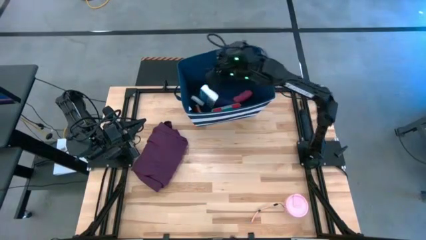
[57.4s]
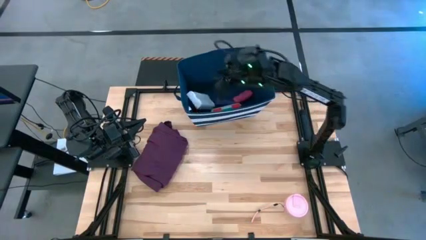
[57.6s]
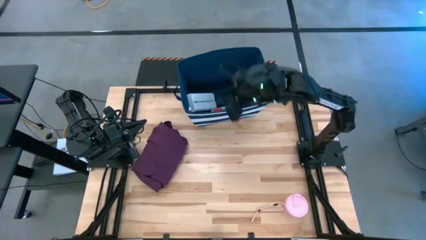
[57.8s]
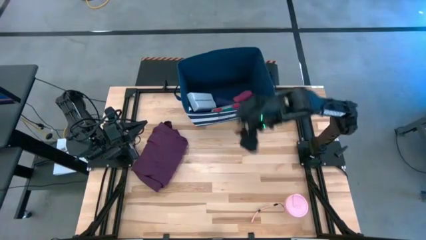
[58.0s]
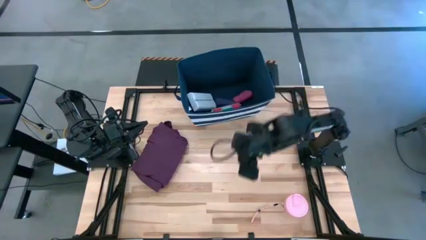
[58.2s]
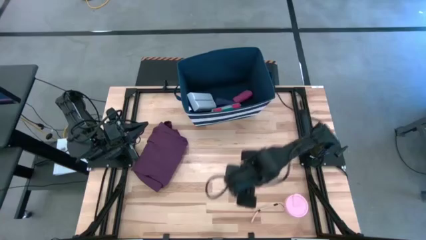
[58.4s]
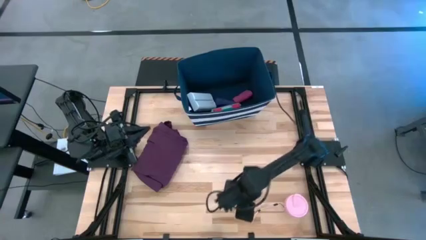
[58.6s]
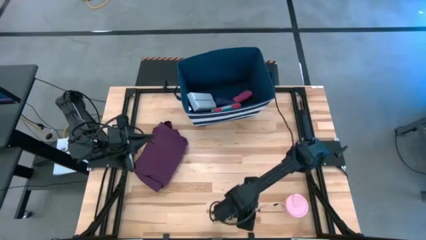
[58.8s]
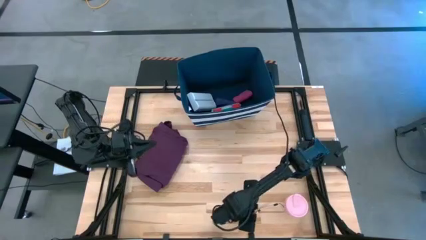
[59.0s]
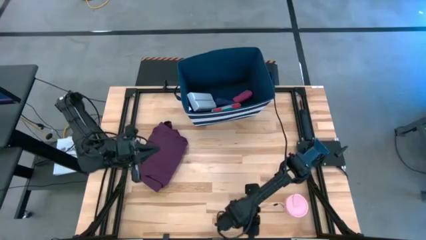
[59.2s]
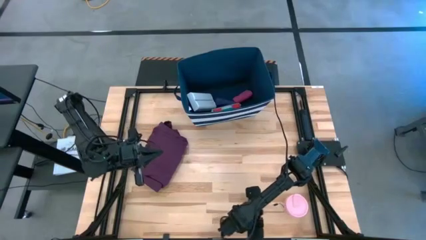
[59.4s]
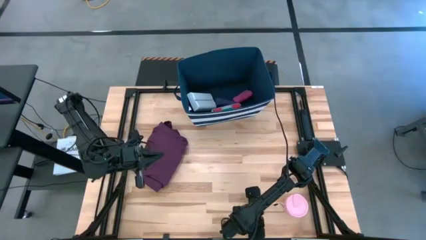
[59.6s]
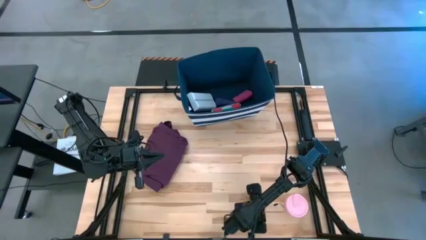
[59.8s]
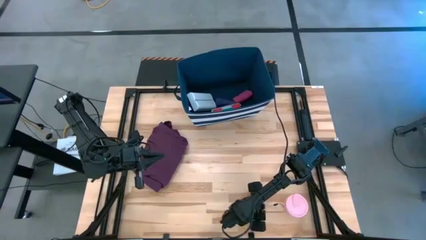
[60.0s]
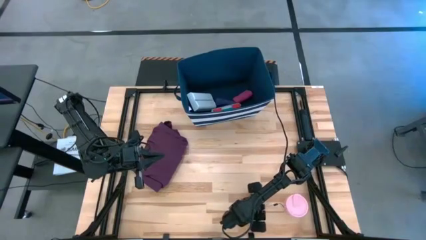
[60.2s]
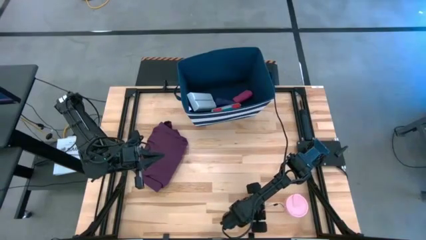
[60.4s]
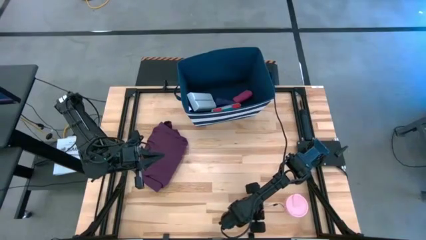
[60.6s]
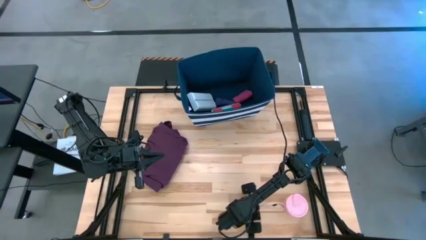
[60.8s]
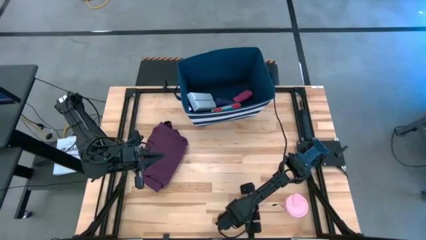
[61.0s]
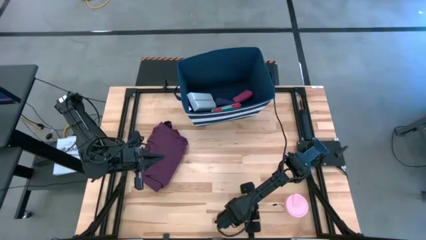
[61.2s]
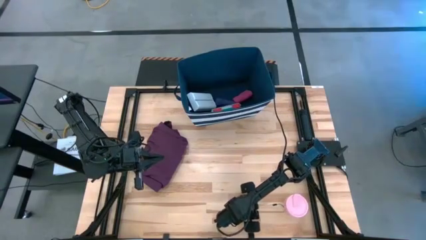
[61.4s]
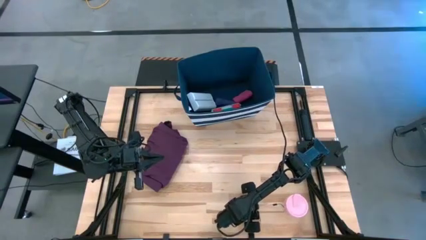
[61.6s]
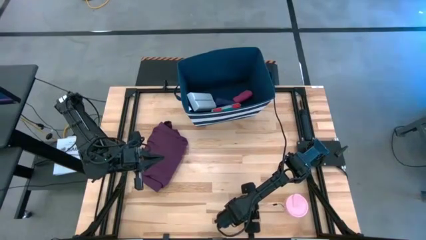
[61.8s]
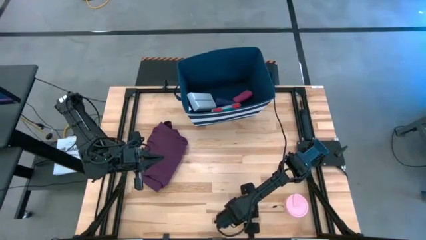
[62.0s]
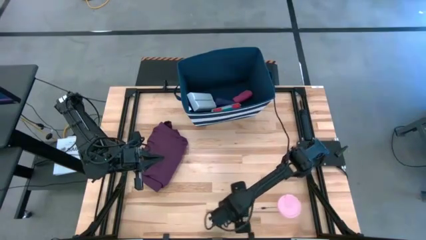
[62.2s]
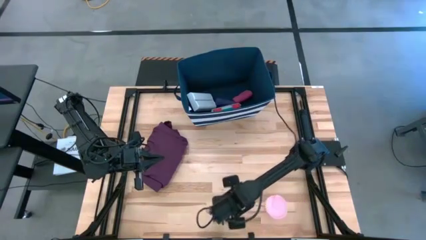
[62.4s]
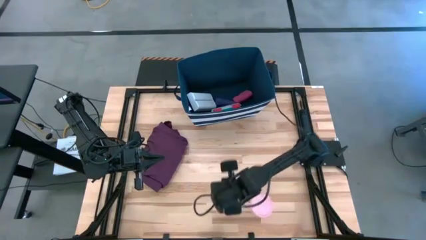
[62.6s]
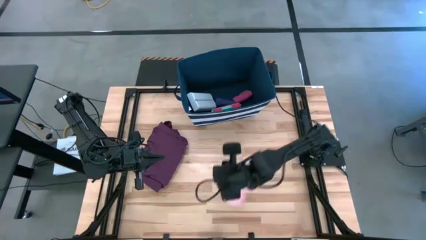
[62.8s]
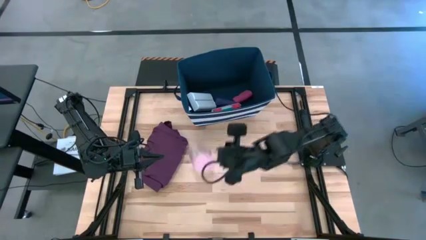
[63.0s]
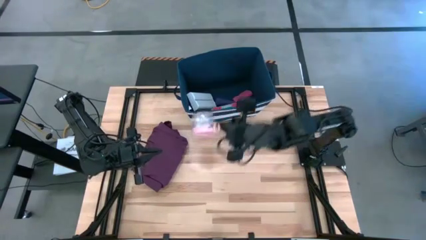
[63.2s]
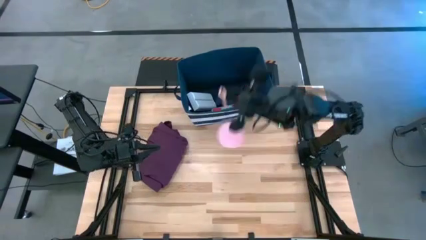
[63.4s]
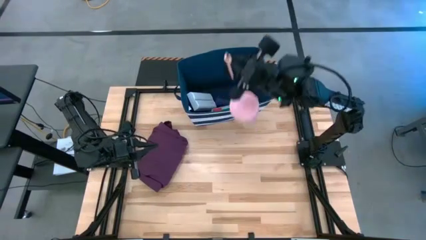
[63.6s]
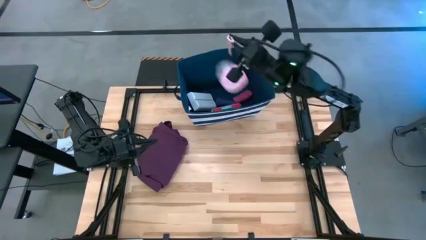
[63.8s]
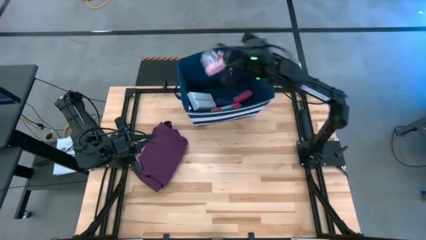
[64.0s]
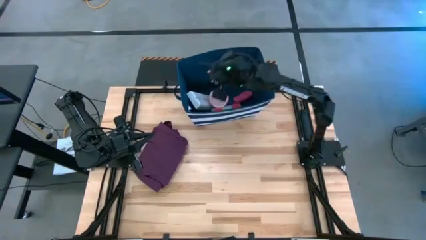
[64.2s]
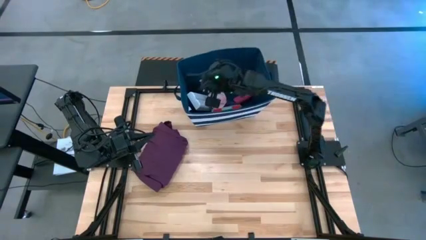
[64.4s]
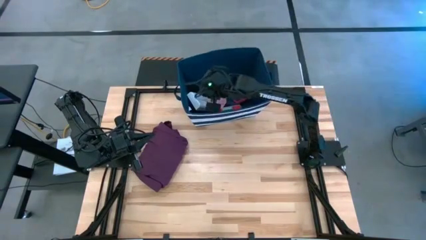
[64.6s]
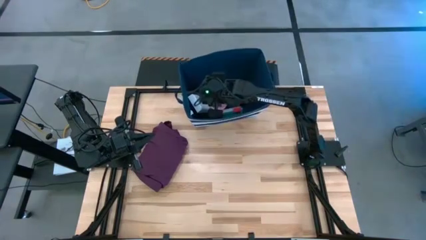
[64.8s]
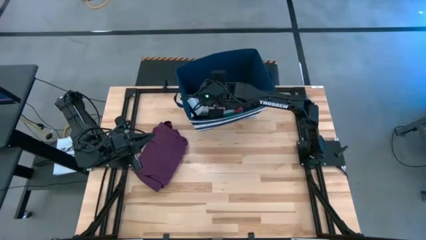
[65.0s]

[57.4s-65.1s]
Task: Pick & place medical supplies in basket/bin
Put the pink water bottle into the blue bin

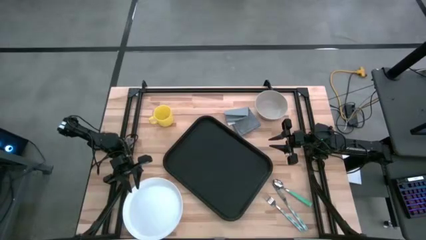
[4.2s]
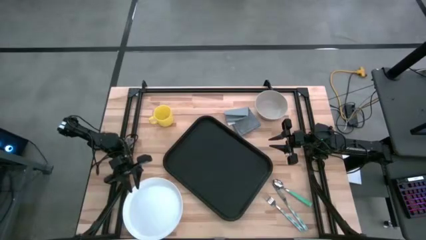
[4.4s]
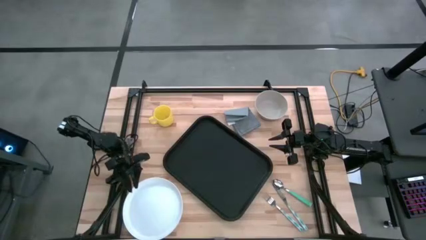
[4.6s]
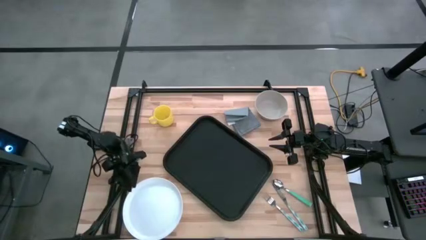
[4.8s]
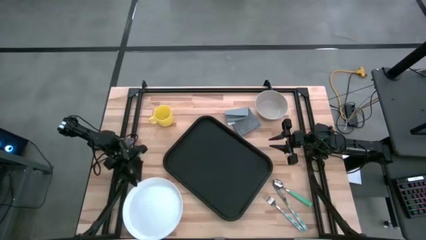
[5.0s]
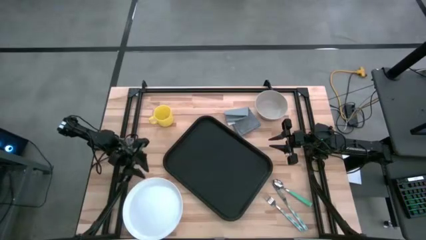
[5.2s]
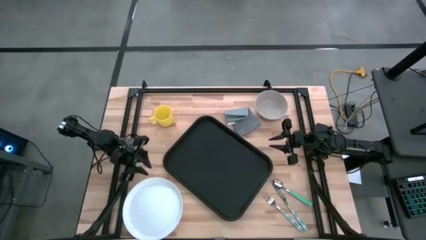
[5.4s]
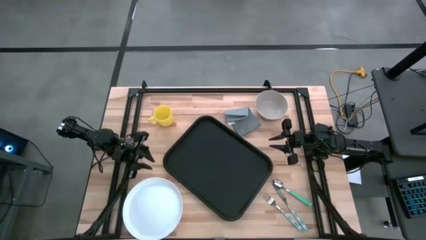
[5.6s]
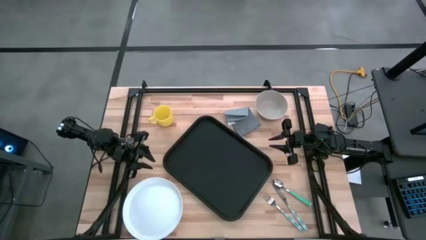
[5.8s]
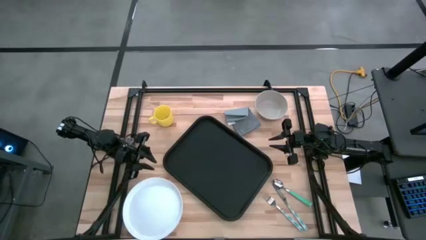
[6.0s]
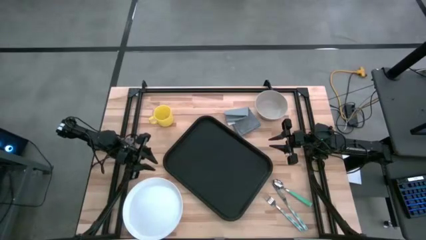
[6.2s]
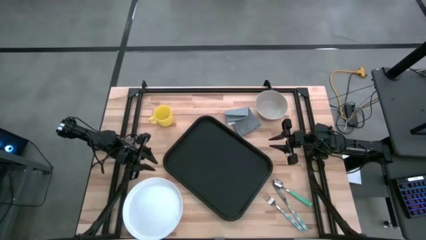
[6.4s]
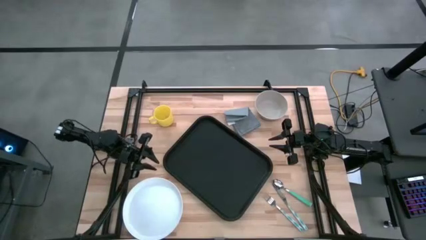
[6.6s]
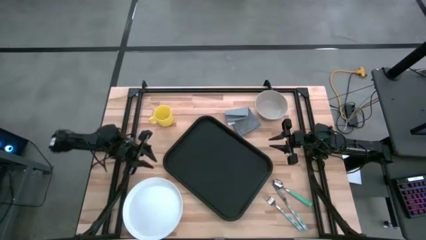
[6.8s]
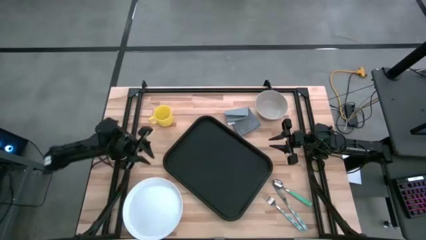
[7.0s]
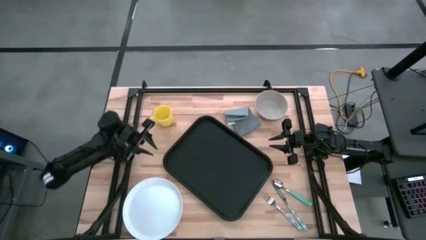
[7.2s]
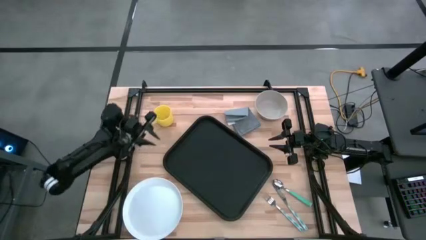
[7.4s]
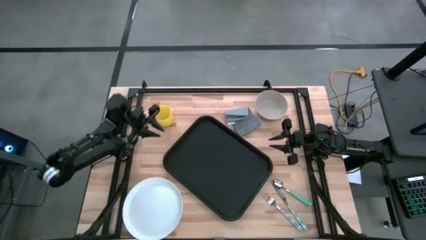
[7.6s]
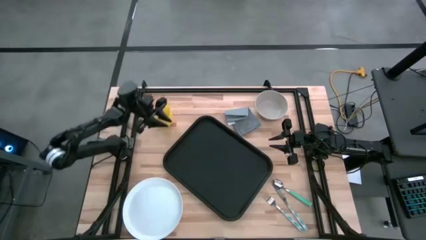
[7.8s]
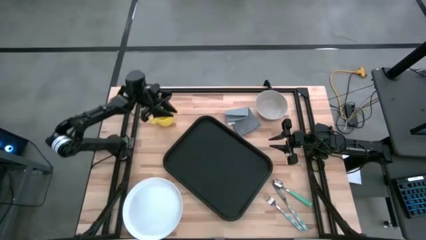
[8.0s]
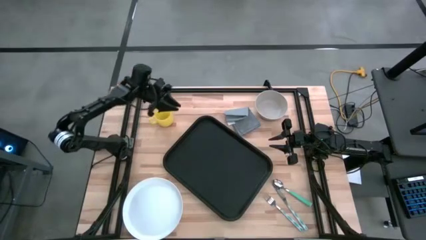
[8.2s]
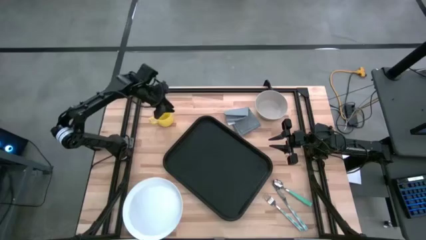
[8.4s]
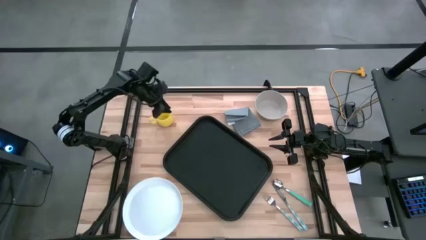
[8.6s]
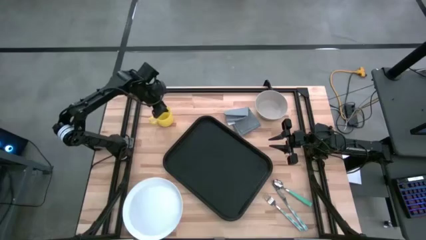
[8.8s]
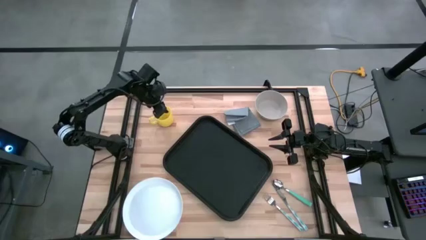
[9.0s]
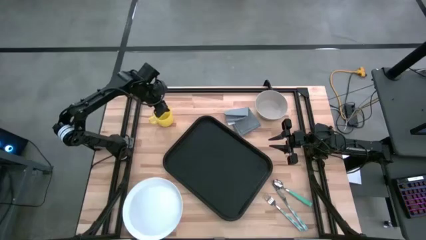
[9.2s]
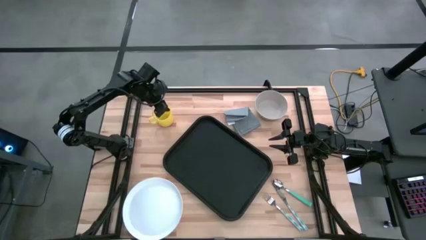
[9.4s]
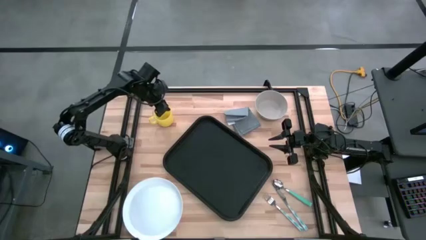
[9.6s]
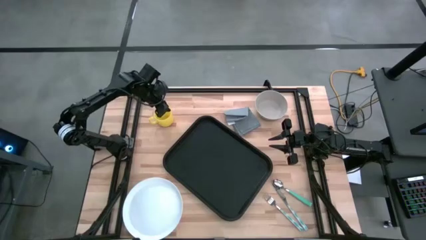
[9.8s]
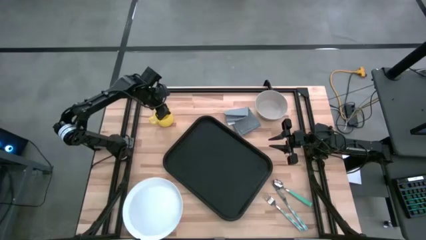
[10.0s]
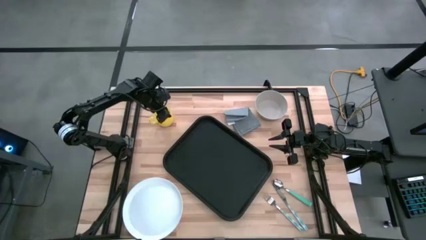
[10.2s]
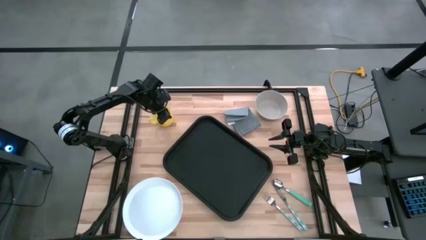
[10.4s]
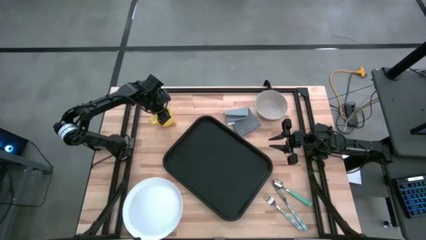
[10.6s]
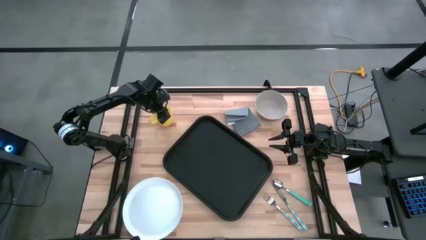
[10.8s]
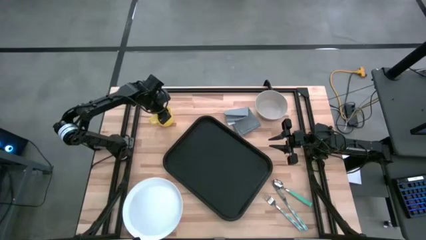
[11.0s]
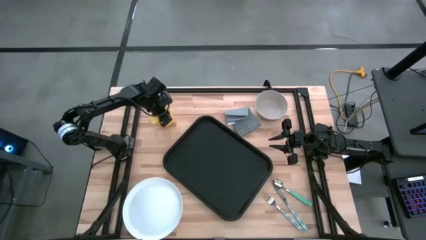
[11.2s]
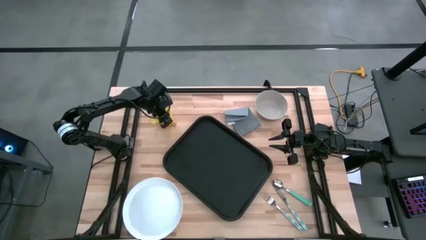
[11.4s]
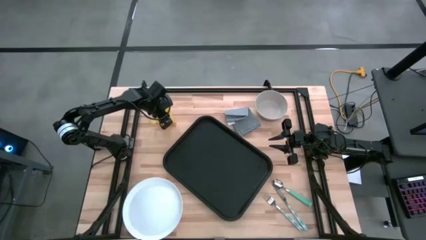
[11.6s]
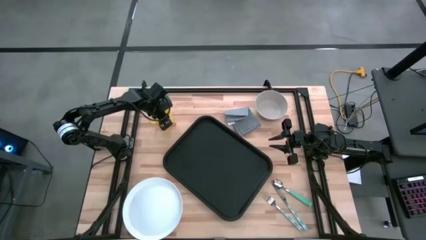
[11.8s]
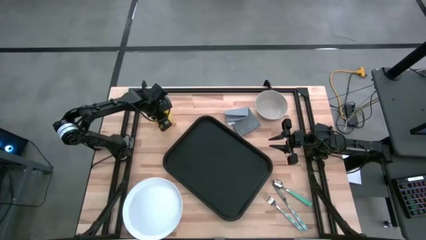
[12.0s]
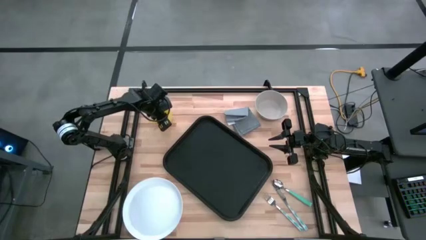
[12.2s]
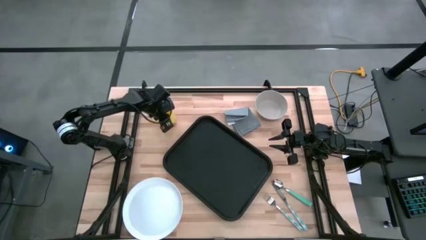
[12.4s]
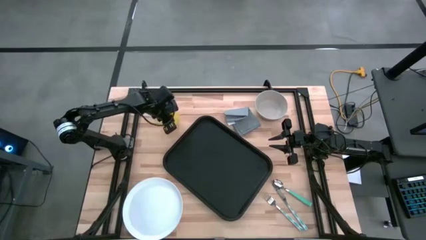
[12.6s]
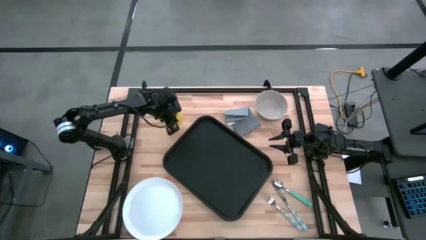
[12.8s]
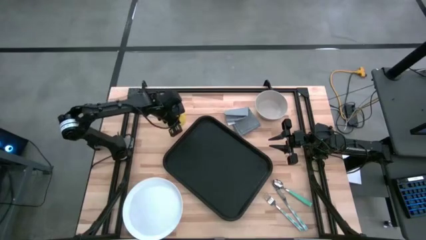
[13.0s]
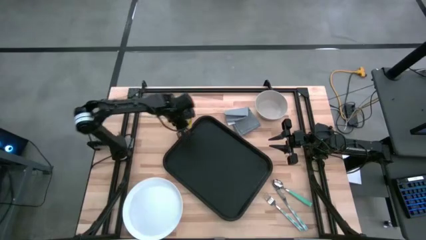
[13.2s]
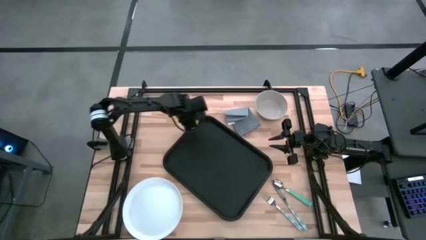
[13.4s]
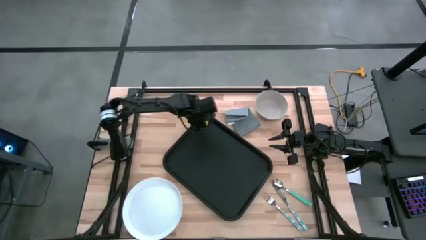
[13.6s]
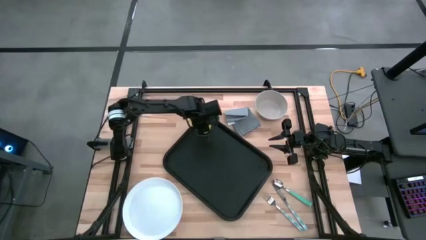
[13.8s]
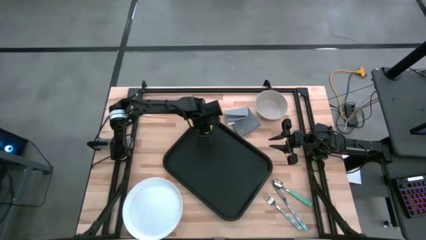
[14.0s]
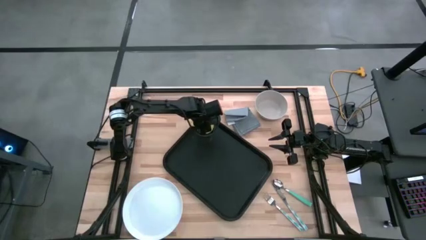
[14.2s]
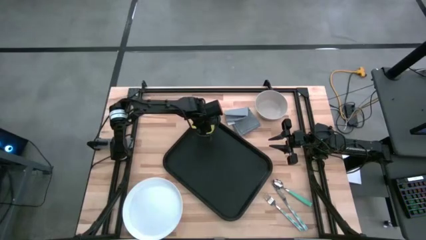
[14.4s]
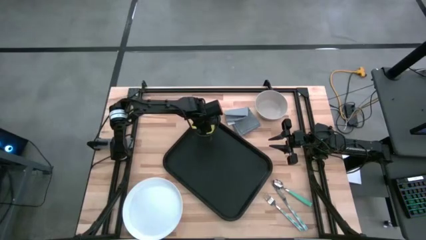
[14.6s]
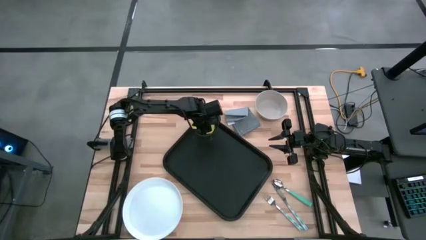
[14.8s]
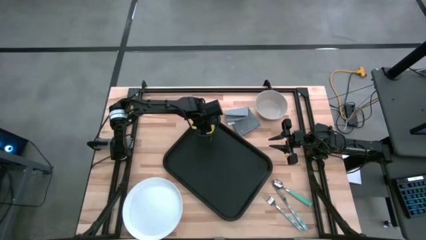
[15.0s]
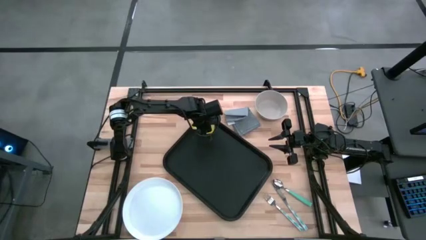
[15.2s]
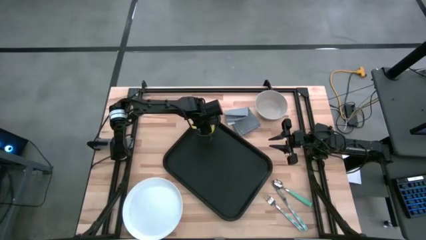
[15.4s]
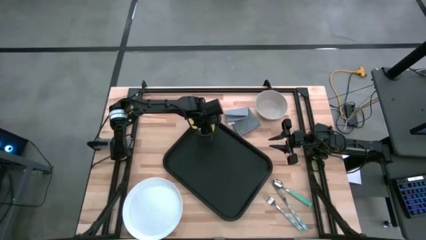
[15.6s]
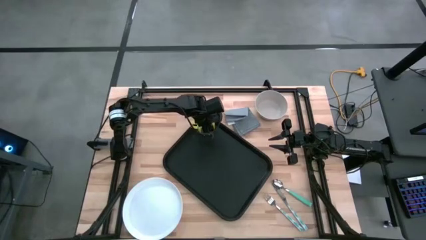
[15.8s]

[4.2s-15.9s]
Task: Set up tray
Put the yellow mug on the top left of the black serving tray
